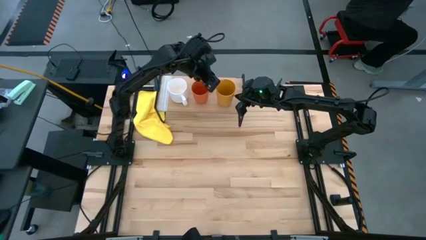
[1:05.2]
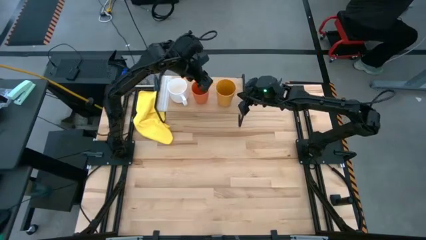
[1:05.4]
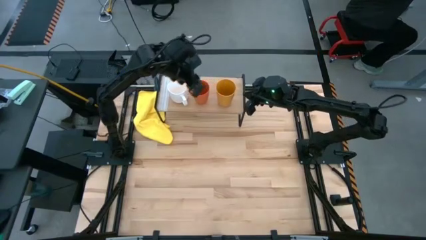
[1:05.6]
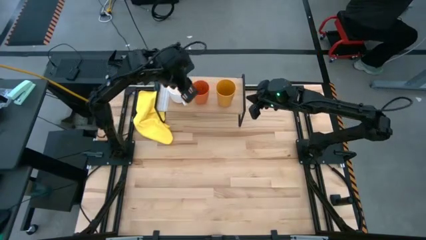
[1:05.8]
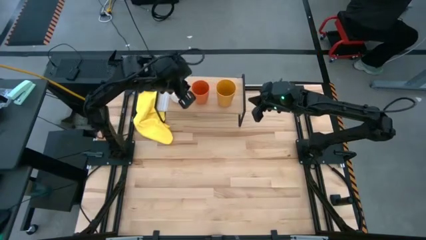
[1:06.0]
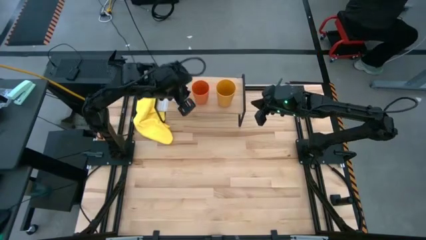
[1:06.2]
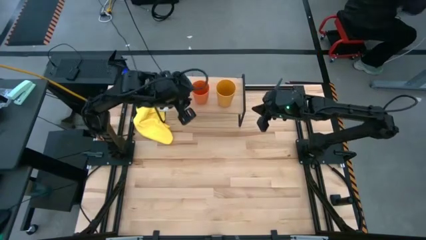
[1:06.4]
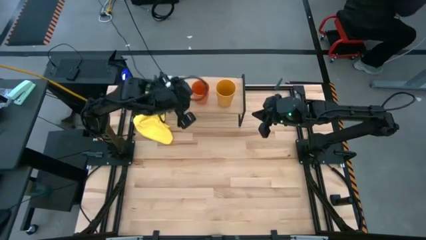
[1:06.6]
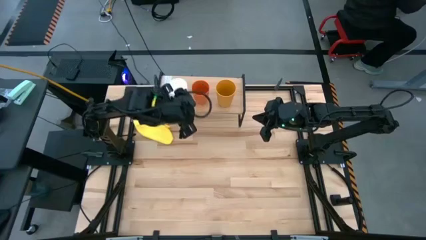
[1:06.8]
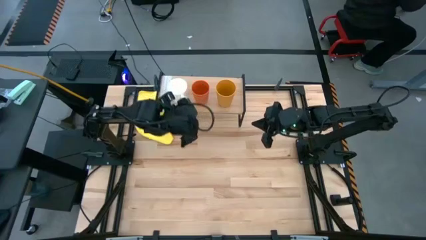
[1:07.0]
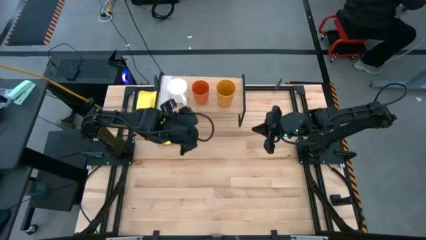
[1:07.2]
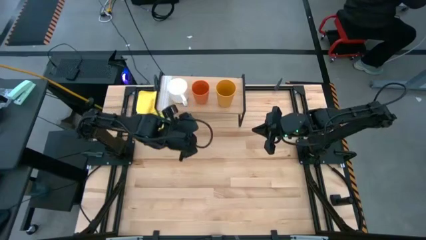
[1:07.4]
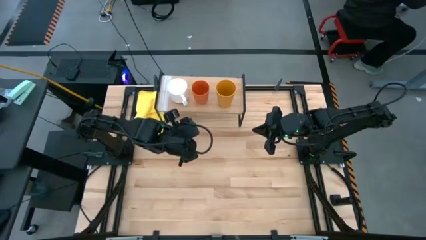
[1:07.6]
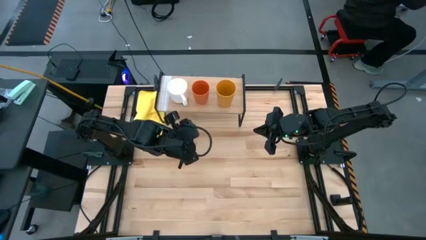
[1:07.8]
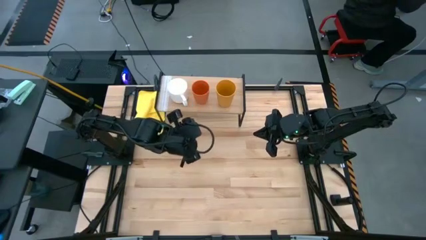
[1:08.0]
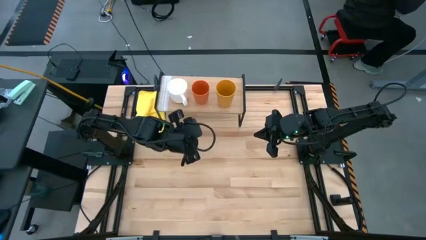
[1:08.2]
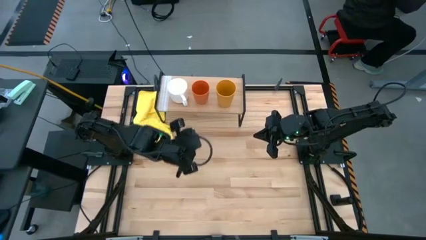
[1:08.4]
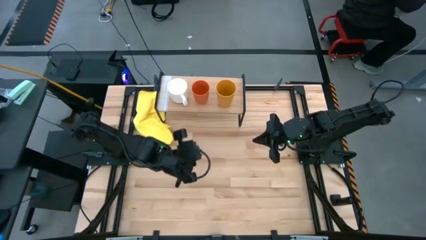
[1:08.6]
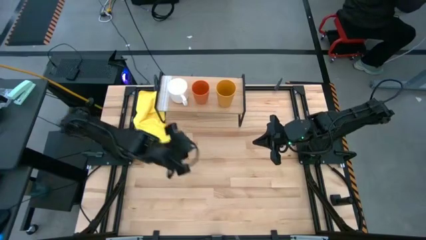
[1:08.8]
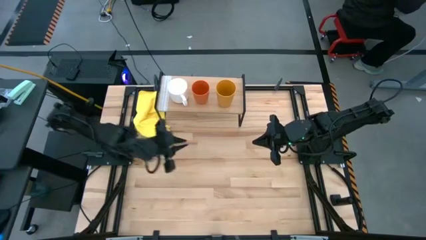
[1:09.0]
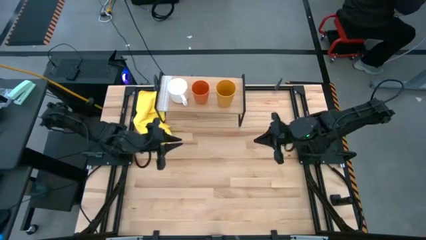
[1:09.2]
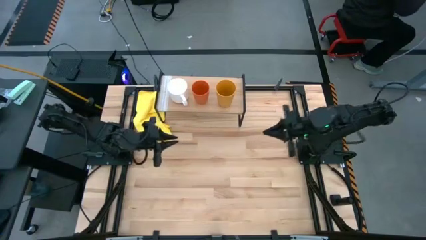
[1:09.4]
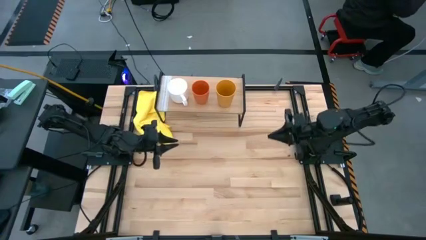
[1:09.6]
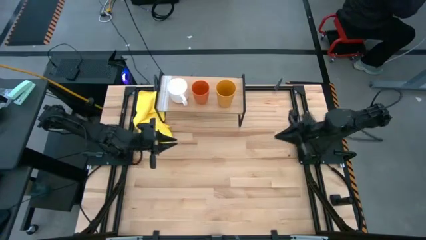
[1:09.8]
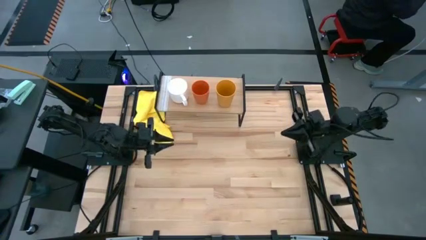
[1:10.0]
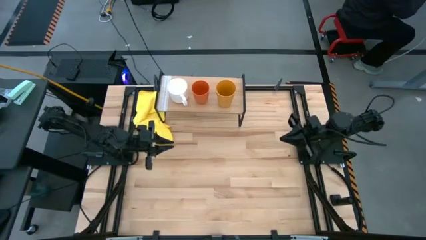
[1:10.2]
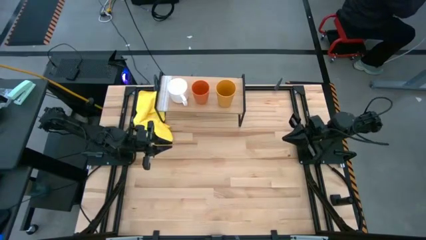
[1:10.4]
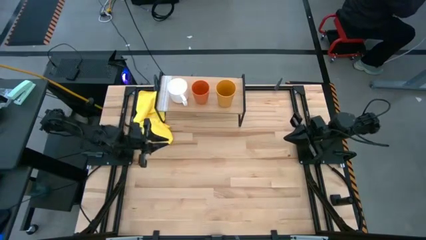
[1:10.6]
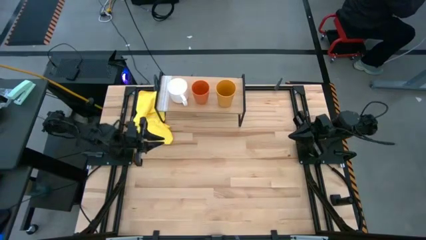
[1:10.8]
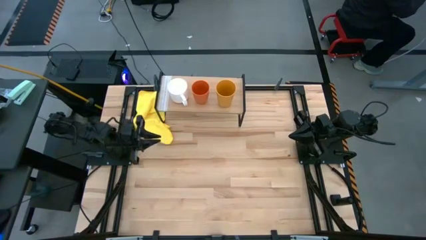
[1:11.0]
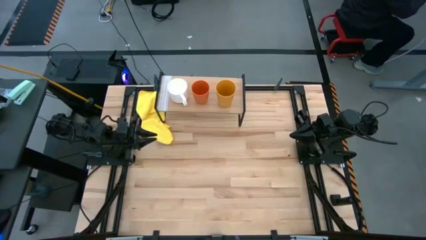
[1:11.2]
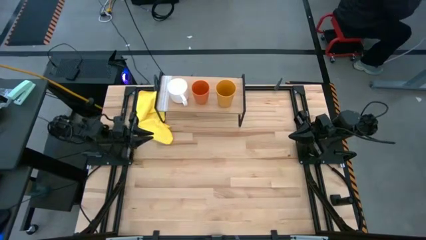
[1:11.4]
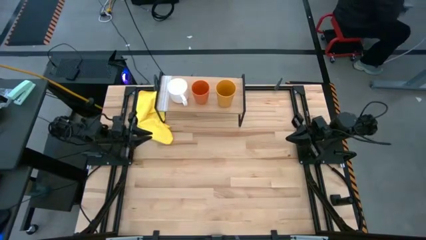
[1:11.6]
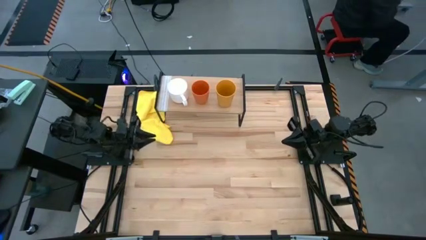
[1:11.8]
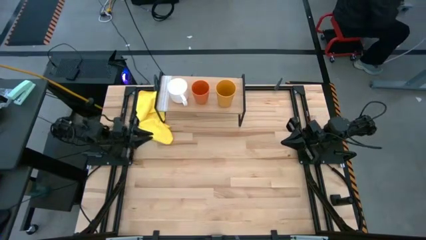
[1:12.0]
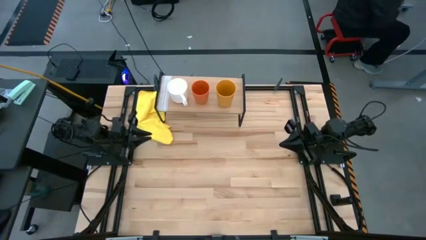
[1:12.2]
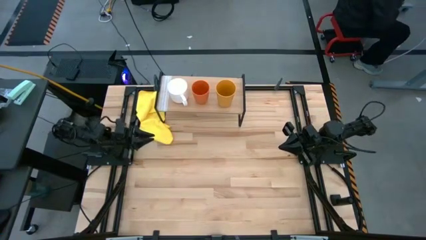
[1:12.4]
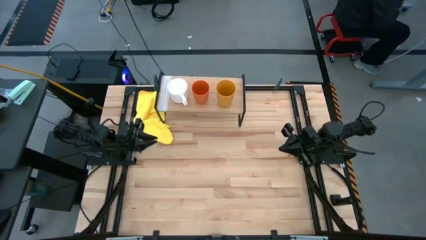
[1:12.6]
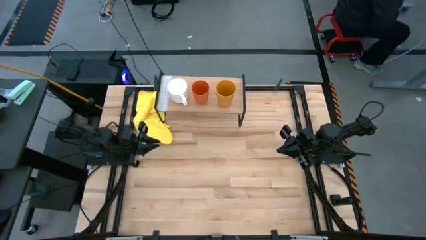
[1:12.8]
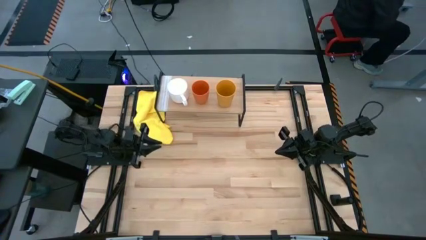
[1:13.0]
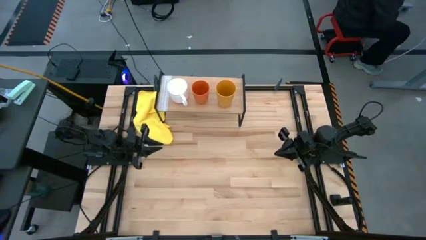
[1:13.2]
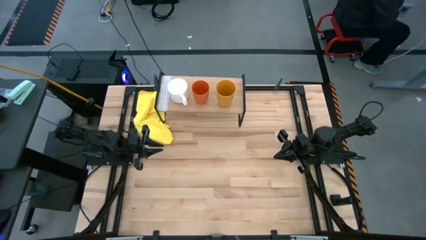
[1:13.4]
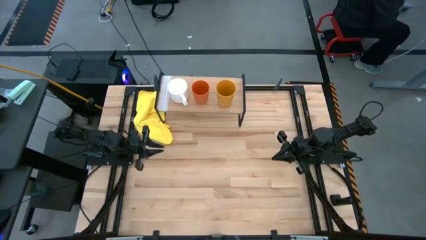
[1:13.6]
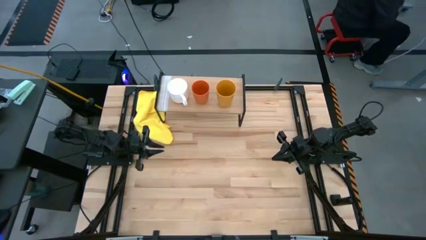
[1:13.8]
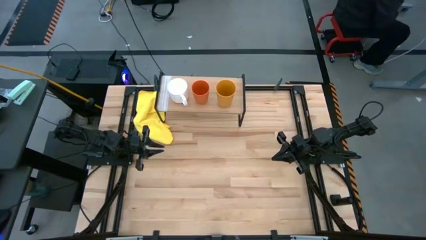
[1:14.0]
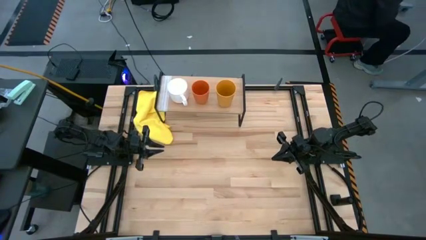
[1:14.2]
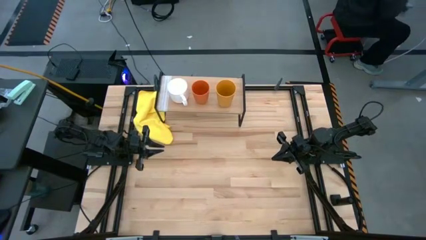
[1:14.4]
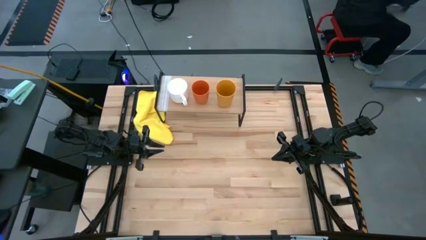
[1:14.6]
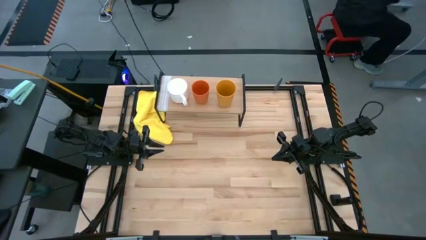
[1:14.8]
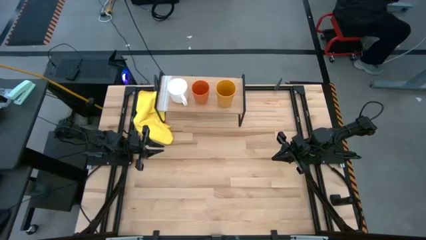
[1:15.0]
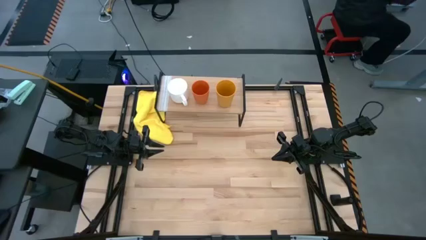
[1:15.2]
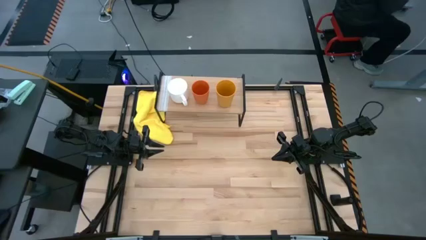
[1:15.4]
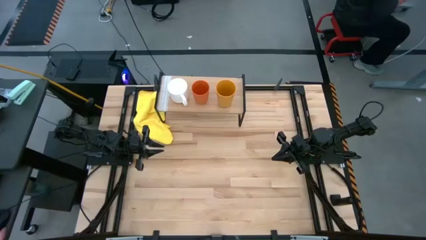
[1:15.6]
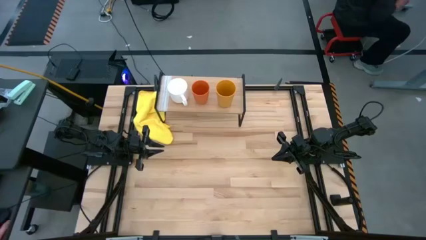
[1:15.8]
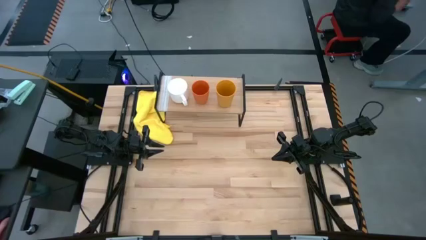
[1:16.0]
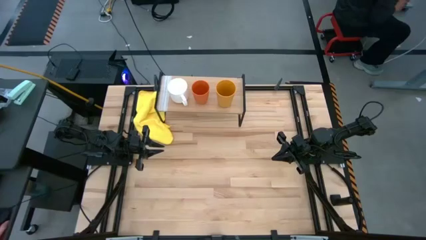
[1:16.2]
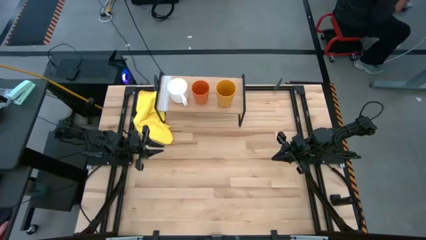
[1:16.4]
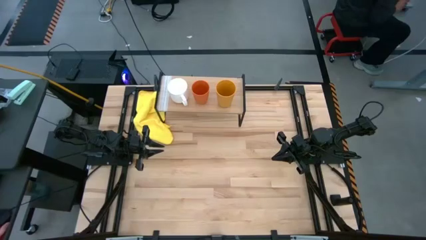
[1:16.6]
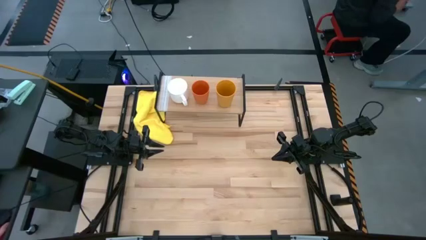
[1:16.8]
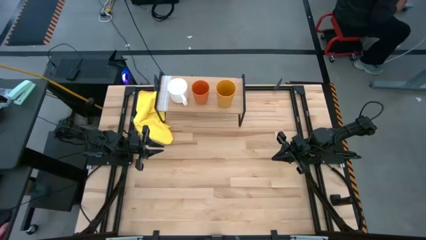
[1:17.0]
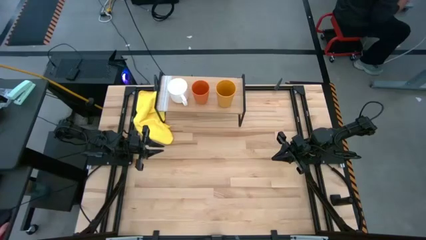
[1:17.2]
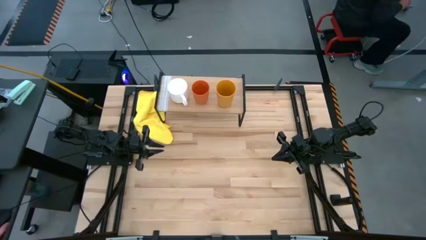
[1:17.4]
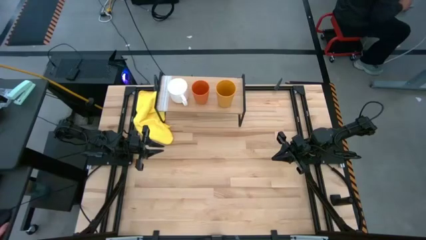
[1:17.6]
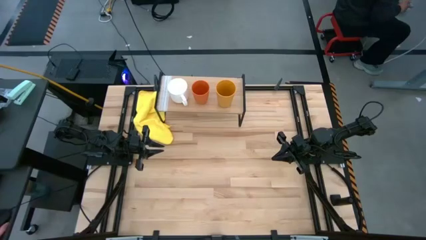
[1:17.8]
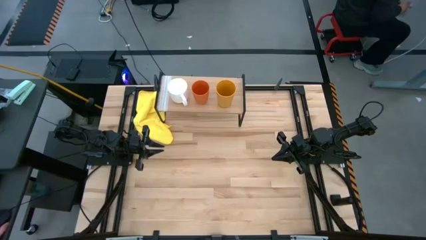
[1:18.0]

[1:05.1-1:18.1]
Task: Stack small to large cups/mugs on shelf
Return to home position

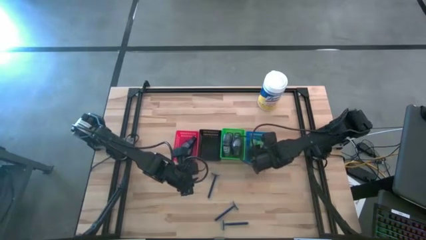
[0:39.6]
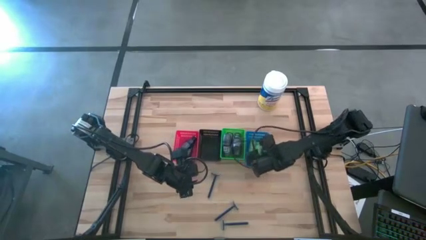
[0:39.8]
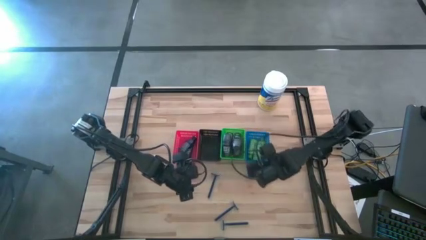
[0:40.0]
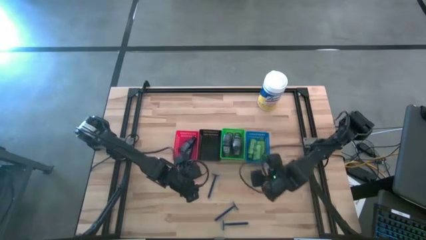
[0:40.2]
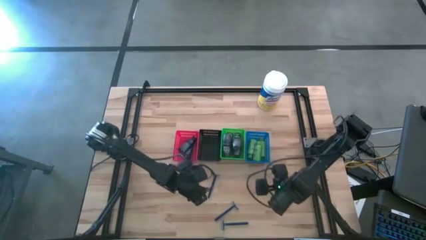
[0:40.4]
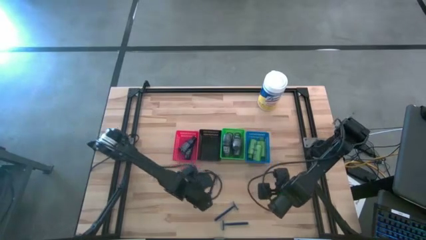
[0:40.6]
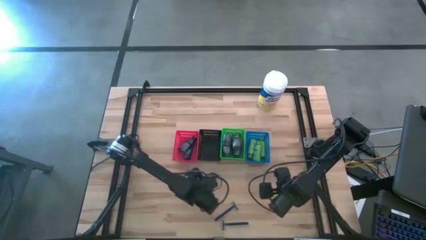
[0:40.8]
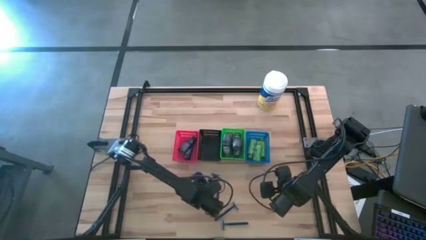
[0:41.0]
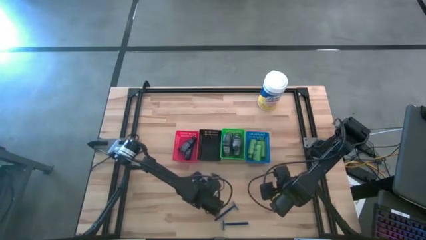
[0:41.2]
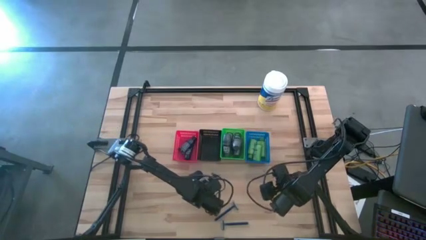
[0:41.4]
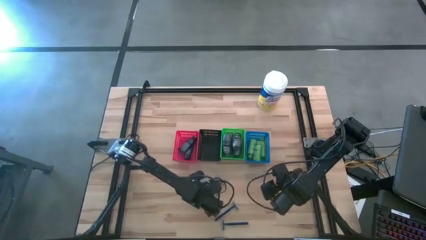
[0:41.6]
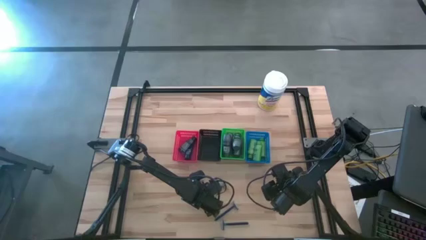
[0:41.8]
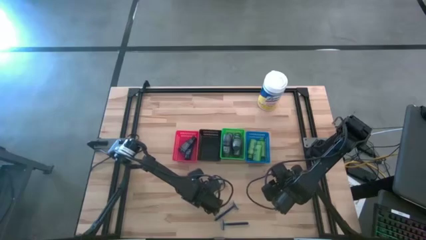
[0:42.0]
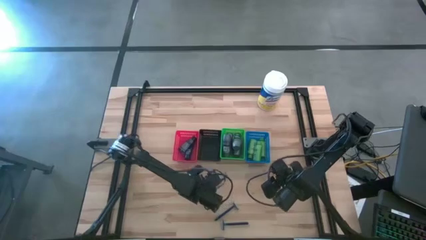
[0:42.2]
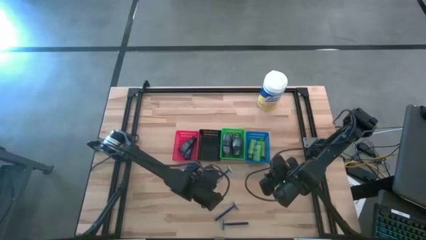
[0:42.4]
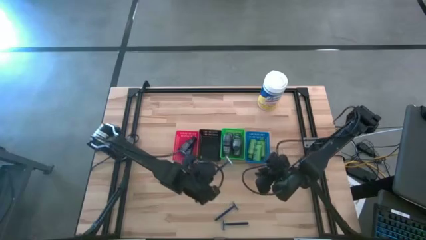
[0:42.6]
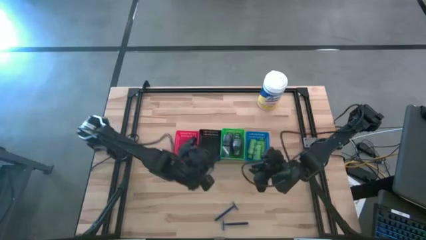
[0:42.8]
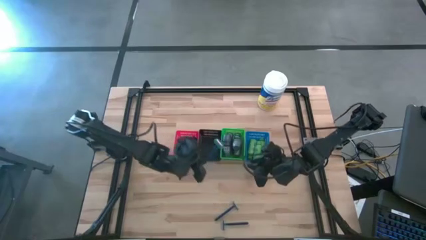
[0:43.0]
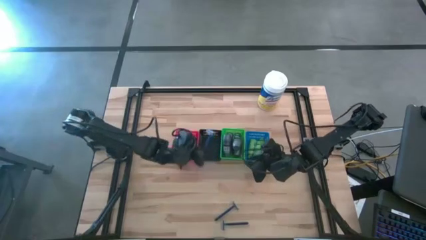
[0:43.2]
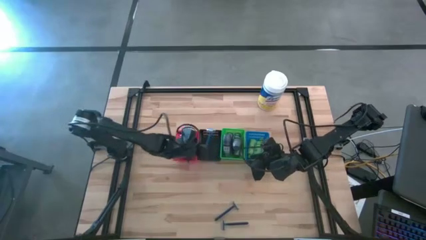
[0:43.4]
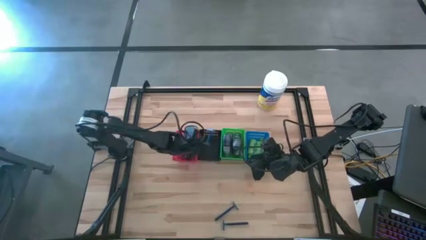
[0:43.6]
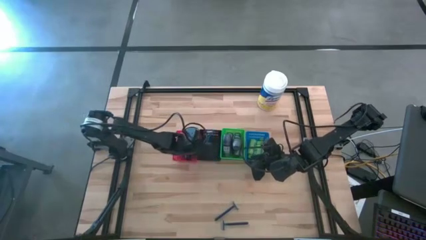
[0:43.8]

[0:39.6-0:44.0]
Task: Pick & Place Travel size toiletries
Put the blue razor into the black basket
